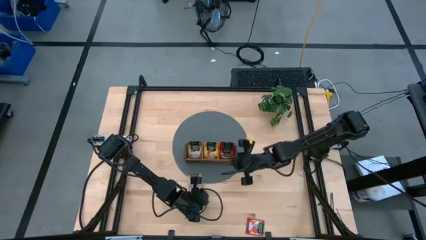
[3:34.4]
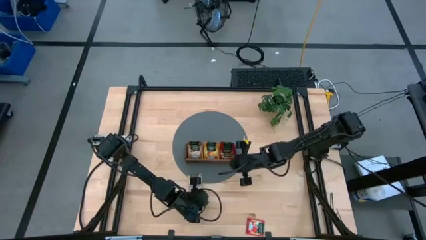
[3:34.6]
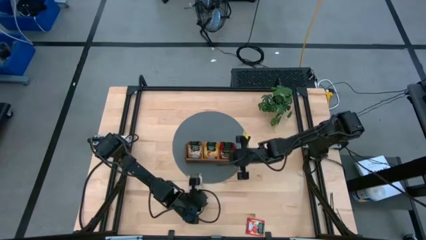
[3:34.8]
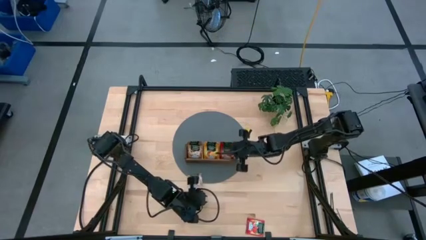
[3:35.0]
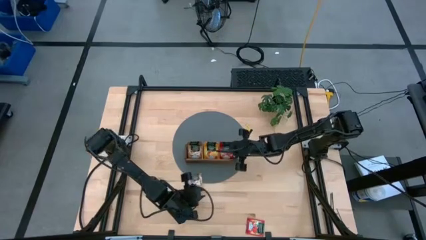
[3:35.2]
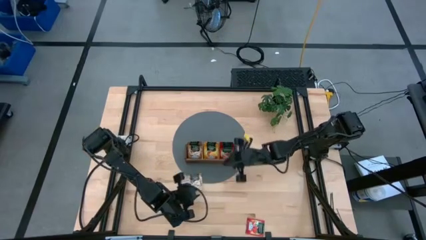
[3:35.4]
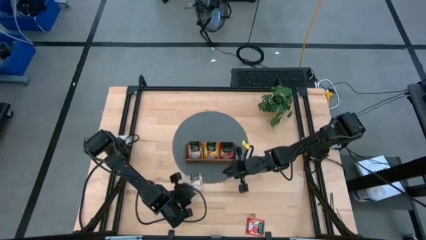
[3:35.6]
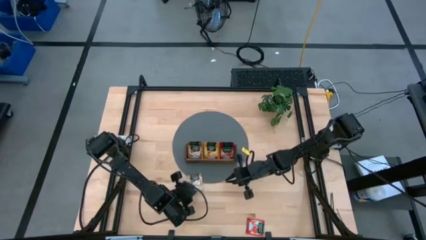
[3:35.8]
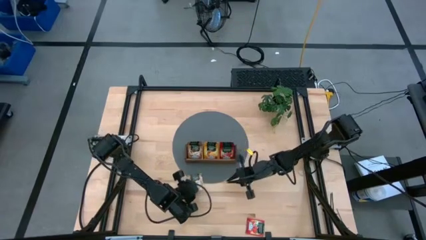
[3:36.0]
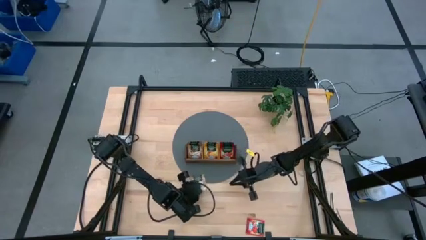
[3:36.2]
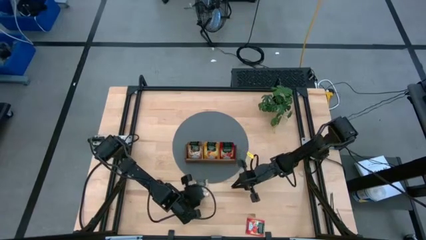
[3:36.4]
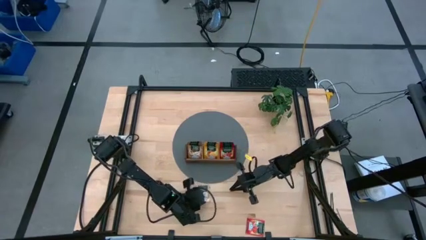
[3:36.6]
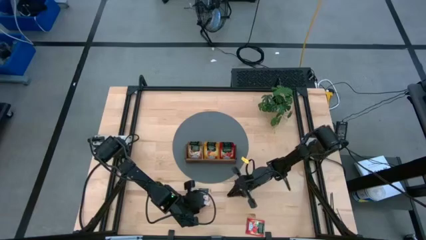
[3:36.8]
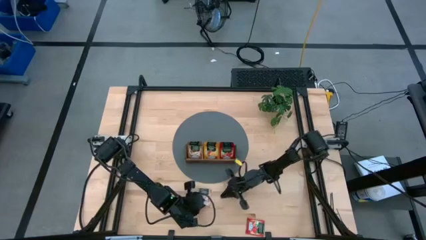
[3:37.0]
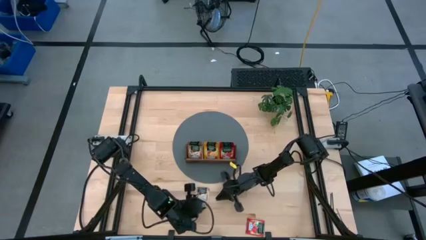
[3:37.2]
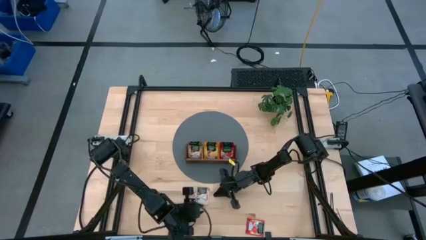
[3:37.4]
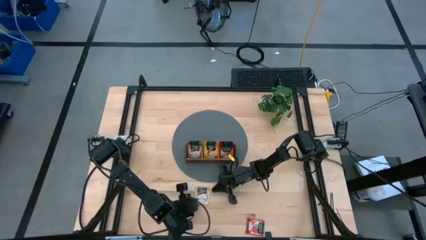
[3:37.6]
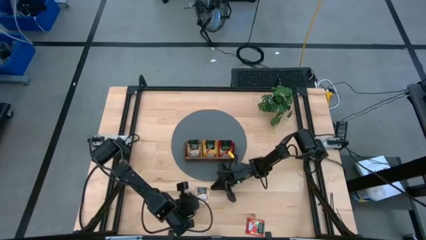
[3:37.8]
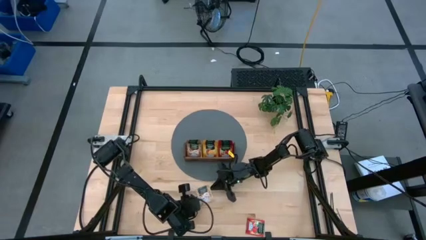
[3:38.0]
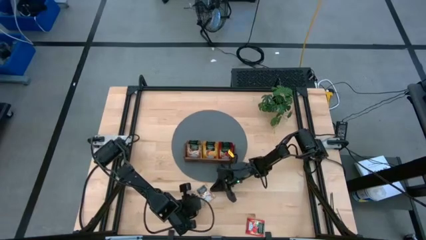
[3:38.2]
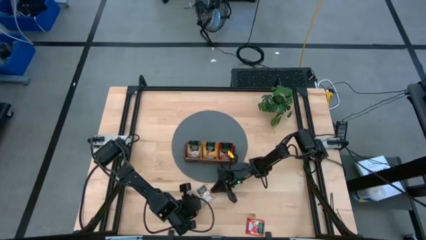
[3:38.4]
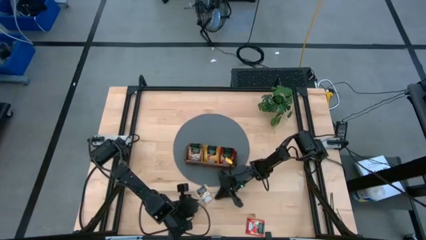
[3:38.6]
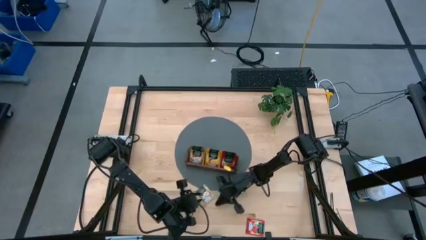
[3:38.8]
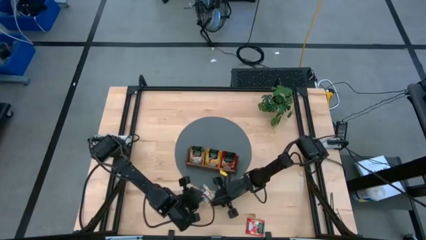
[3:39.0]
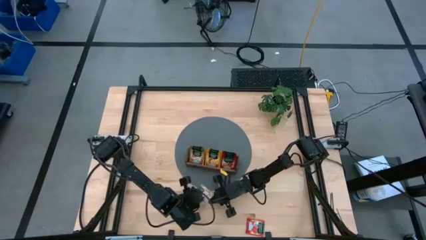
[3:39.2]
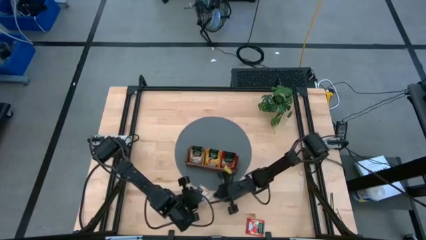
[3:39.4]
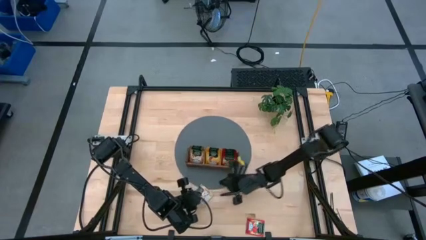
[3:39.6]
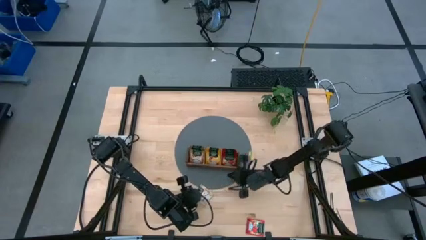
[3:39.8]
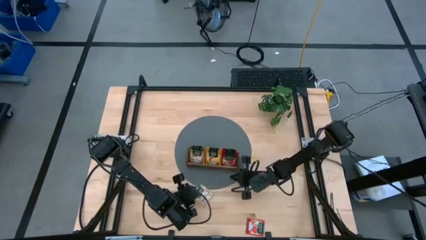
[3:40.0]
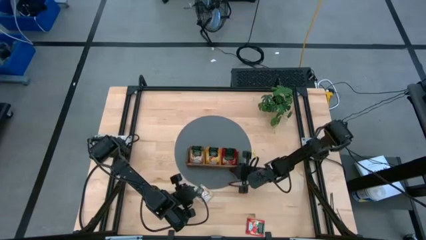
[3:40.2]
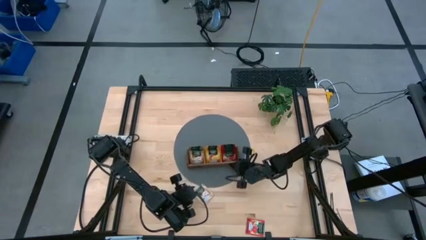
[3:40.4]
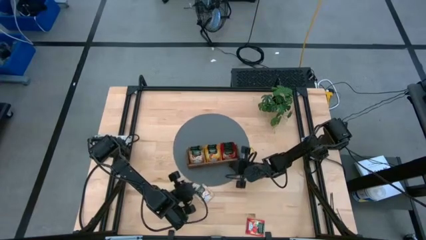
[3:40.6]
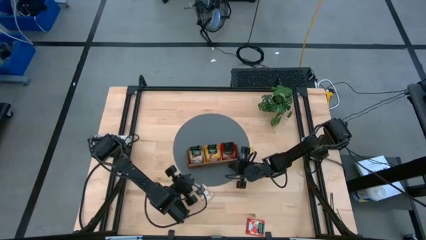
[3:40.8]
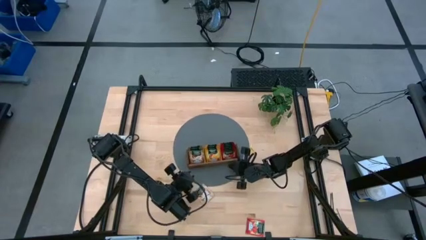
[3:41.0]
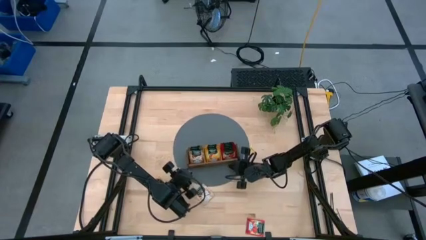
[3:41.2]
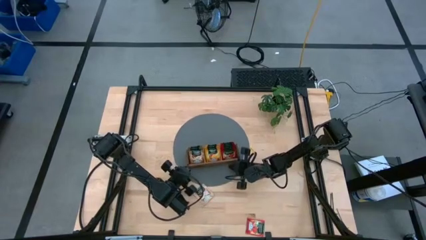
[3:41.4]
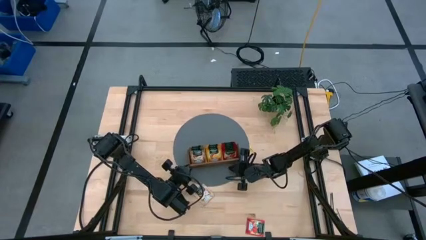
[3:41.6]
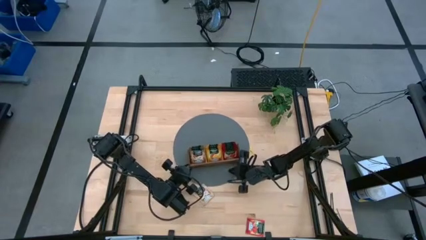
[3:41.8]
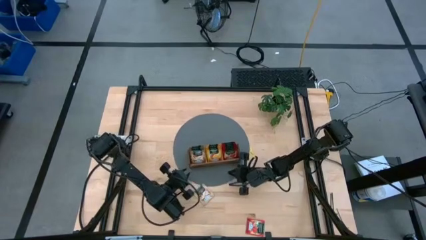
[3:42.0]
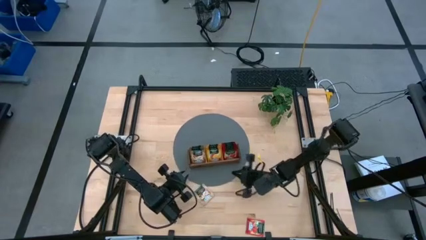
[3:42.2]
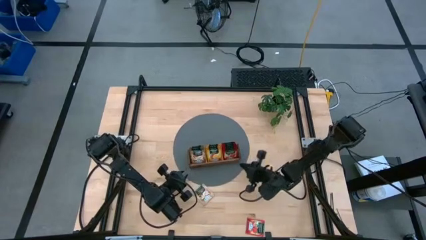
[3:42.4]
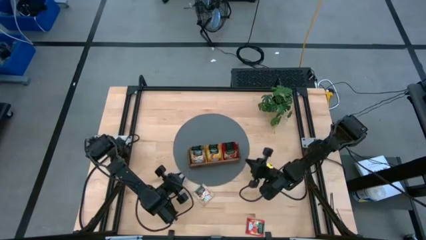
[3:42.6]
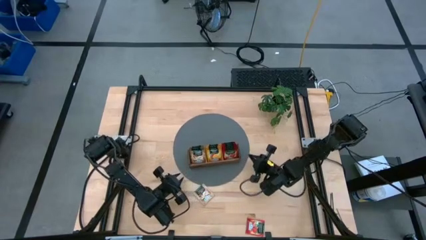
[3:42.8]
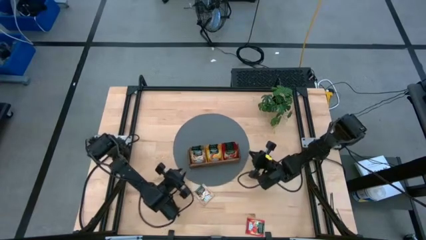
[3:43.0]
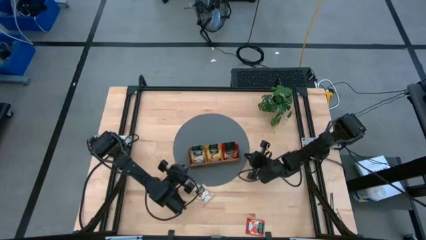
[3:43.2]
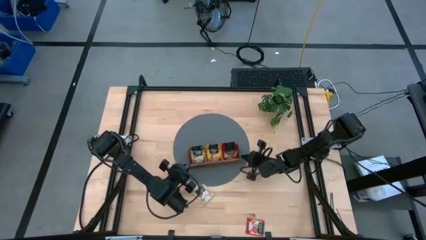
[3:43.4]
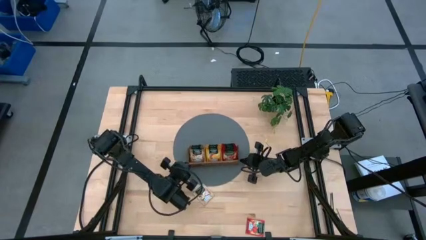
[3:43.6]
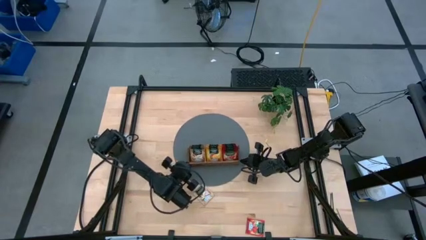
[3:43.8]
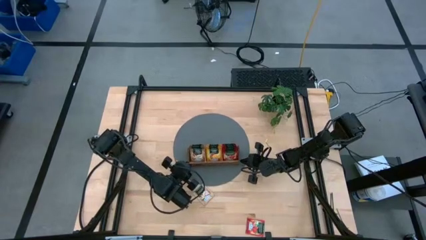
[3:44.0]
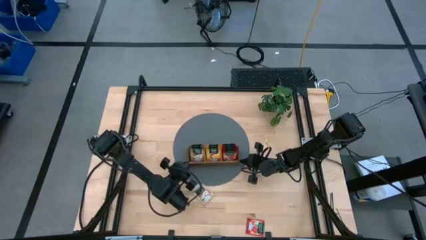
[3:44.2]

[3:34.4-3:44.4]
Task: Pick & Place Tea
Adjust the wooden organizer

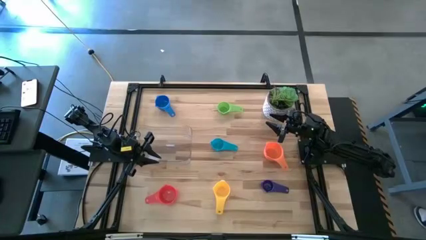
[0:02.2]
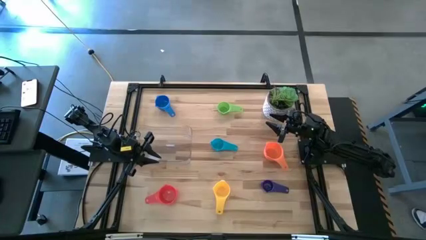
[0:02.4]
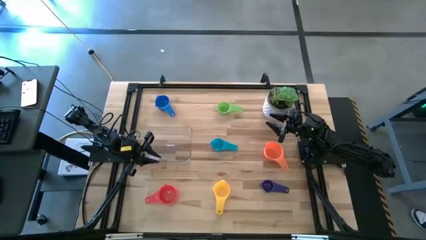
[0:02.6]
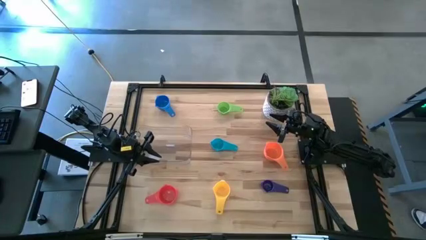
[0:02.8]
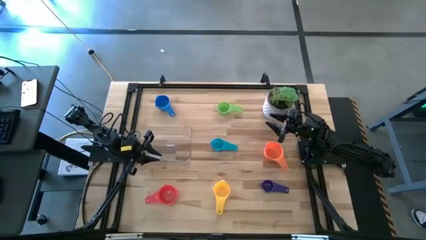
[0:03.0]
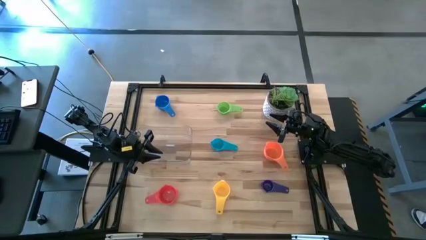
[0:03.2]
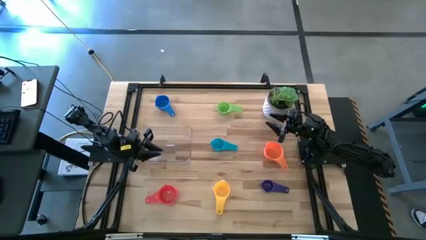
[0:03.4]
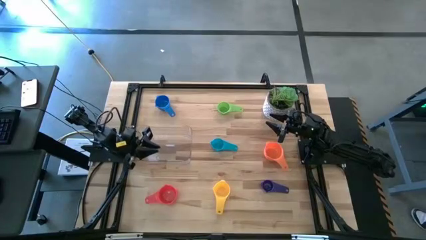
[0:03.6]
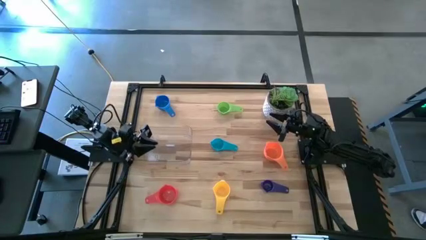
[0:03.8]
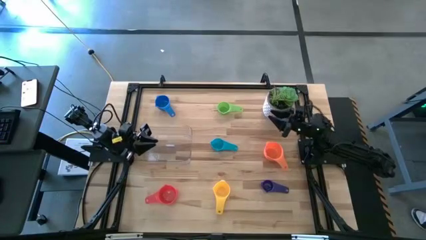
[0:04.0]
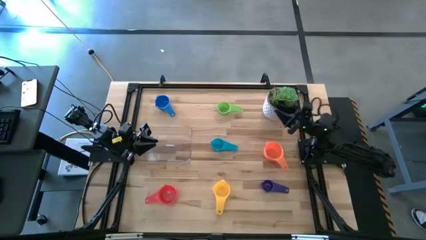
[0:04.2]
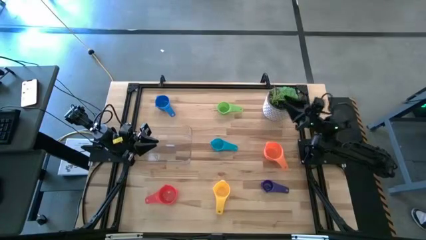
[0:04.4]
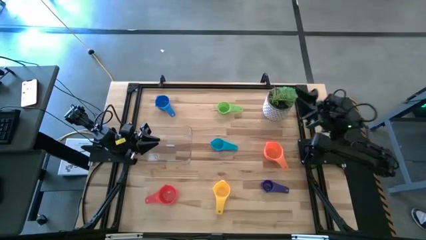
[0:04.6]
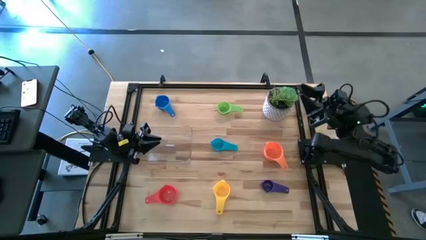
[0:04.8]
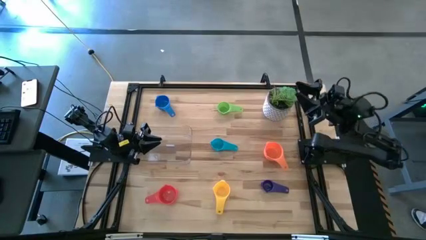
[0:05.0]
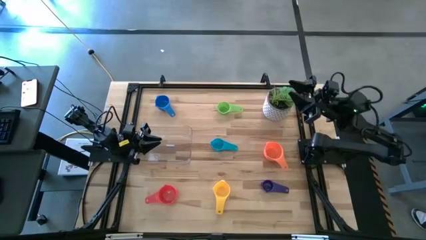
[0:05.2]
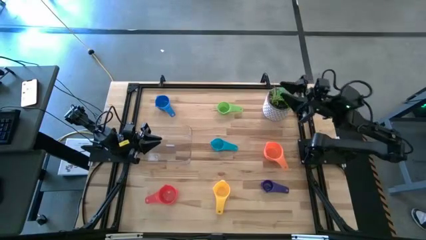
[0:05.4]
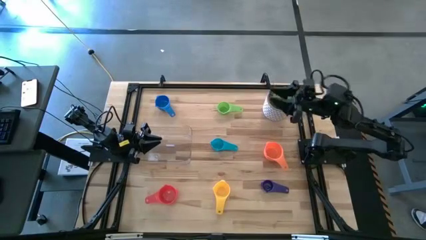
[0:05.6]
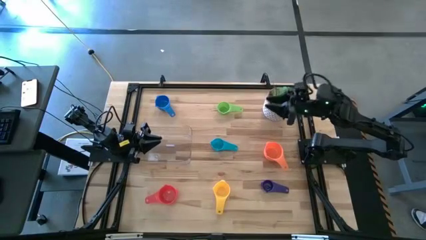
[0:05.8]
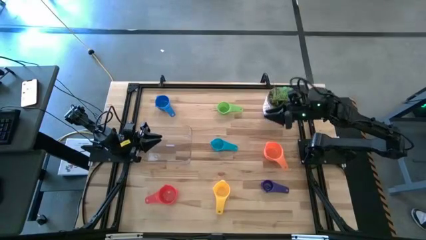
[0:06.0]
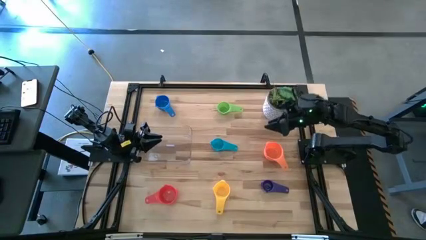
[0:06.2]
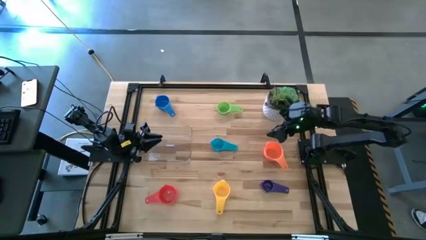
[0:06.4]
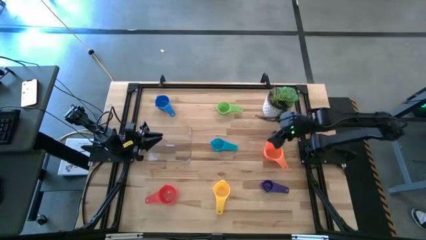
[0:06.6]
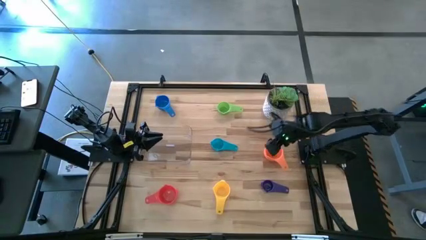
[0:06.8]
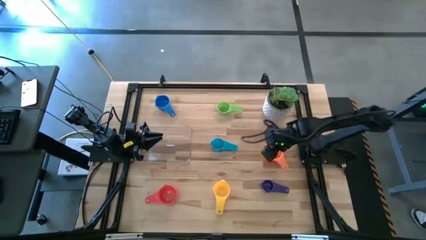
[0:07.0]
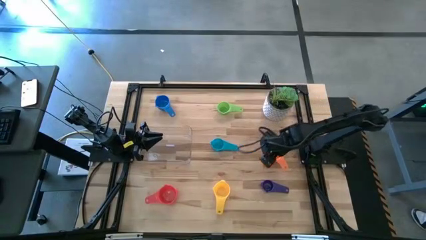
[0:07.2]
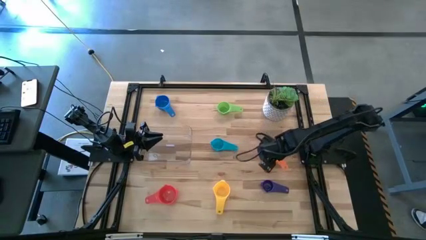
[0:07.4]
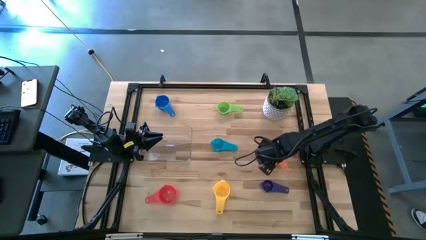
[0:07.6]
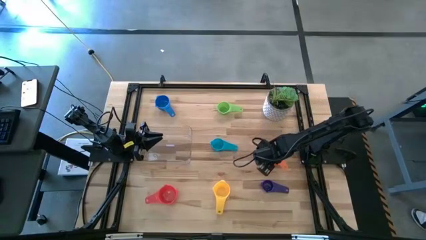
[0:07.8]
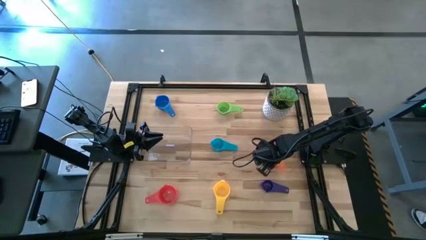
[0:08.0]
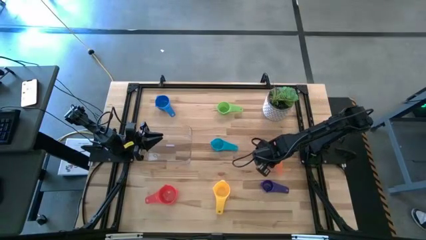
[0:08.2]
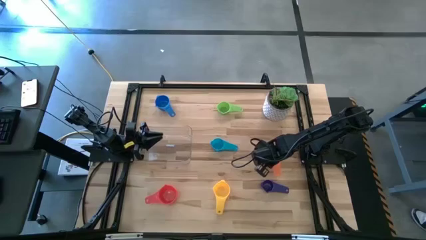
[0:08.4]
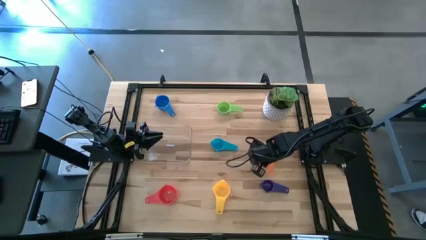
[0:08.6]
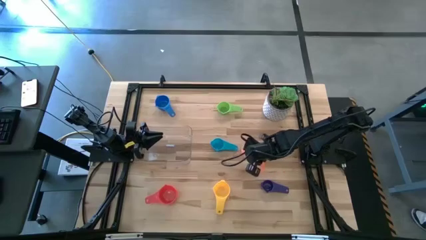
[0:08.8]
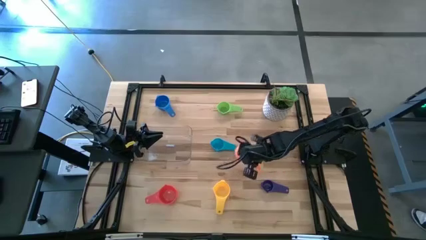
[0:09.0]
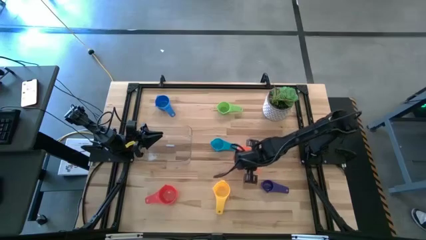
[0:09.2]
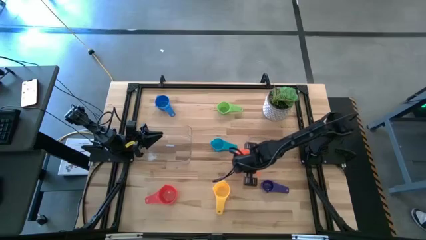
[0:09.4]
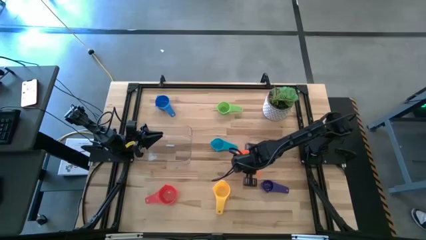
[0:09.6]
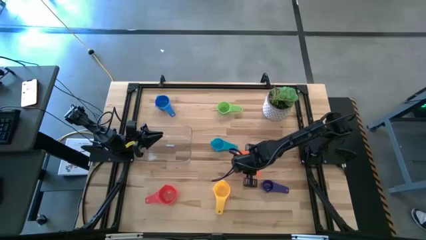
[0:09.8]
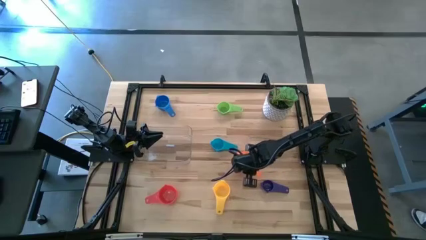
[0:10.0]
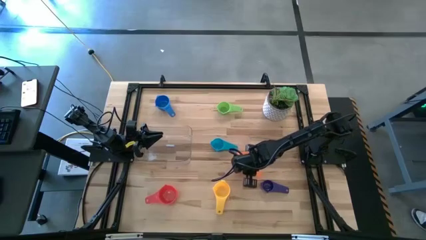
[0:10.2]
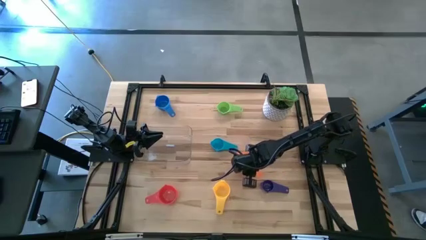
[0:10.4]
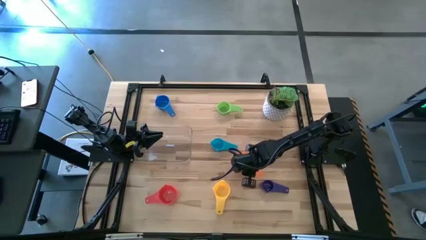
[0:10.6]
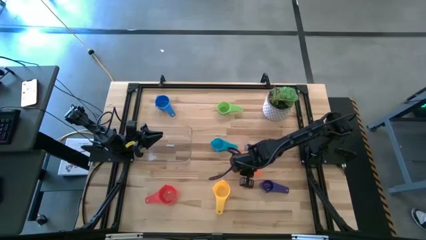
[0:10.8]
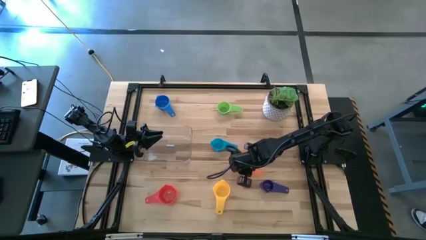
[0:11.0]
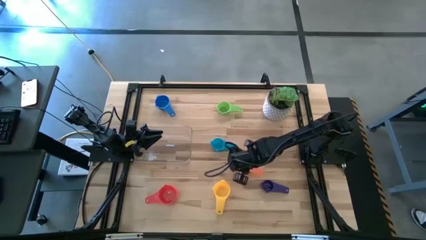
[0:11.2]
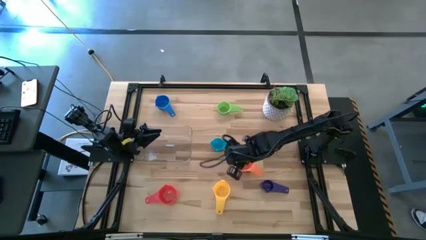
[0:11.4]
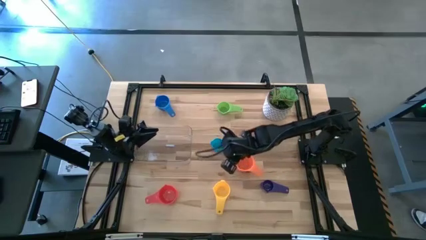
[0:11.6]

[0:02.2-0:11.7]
Task: Nest measuring cups in basket
Move the orange measuring cup to the center
